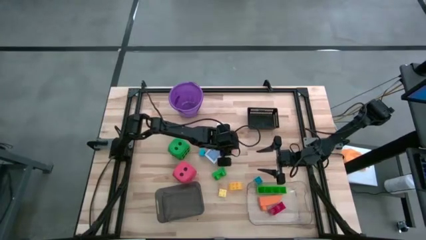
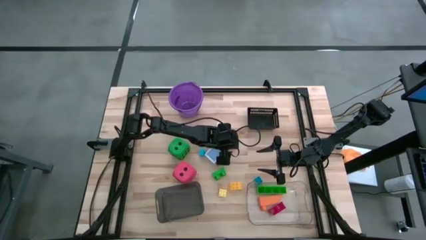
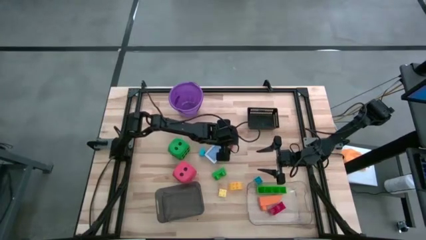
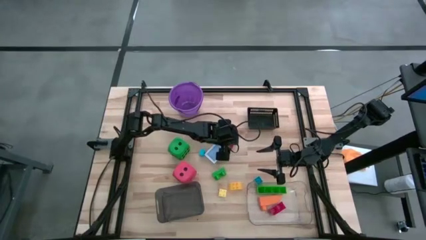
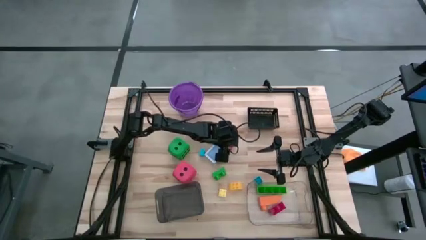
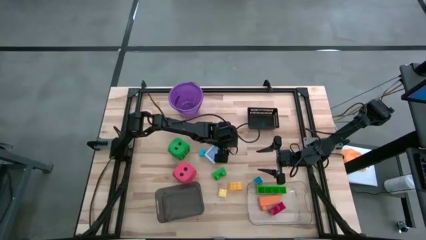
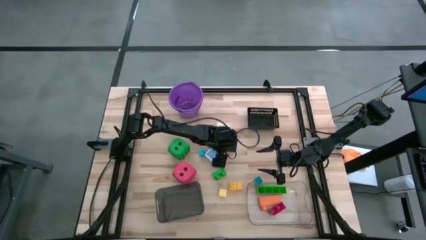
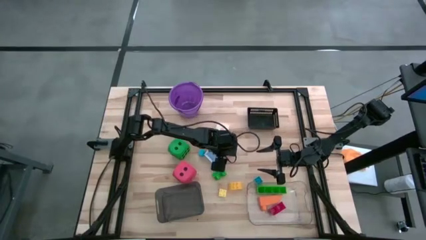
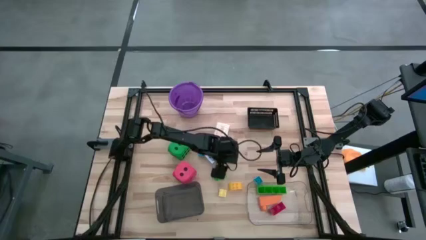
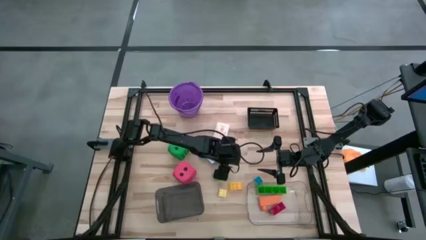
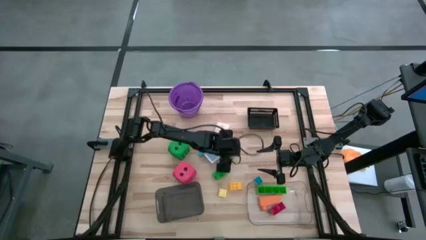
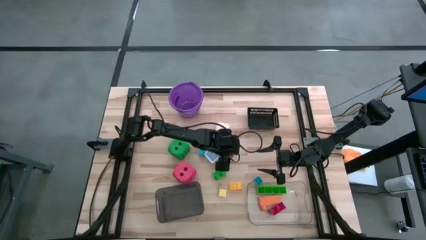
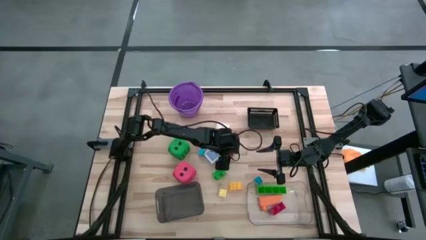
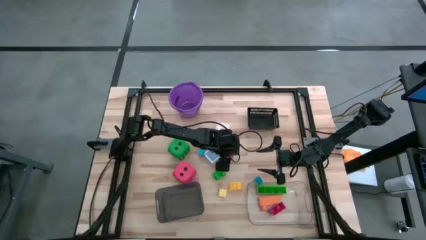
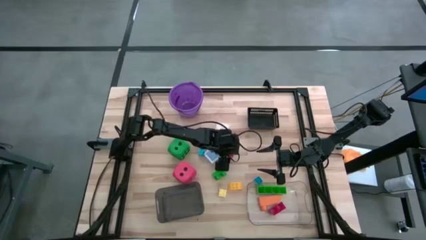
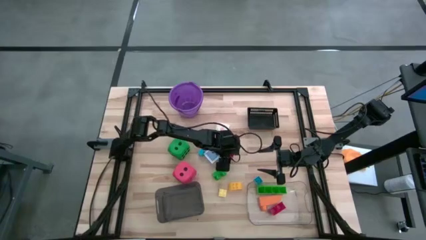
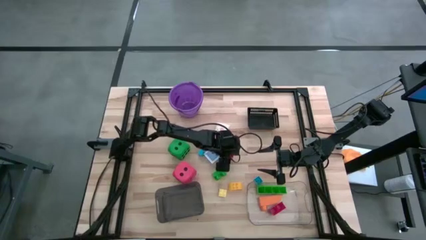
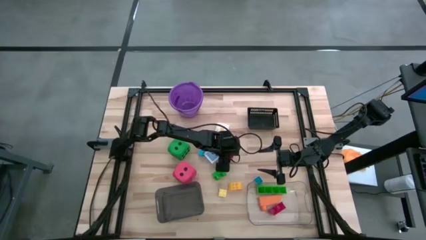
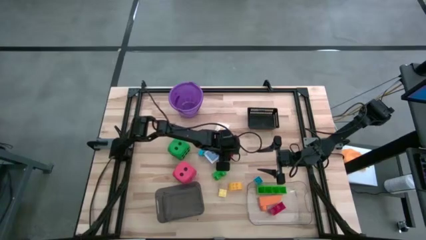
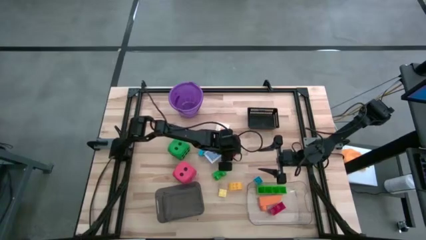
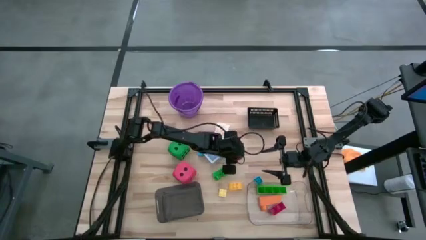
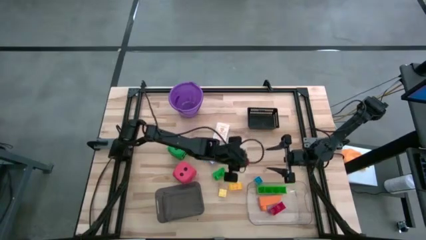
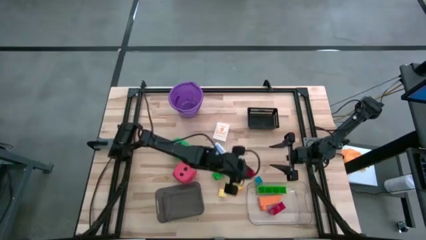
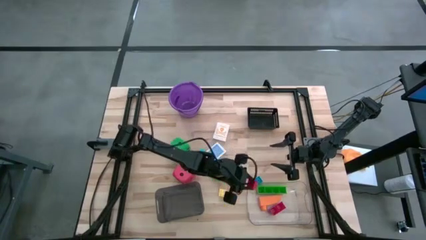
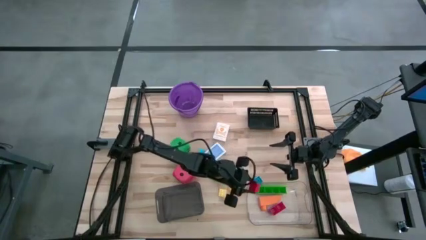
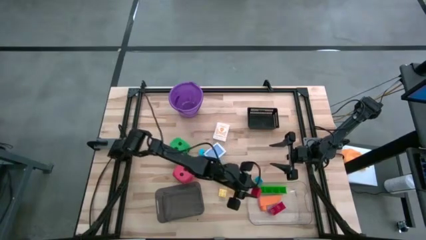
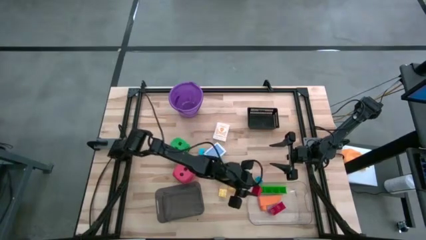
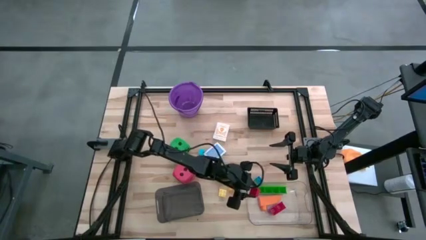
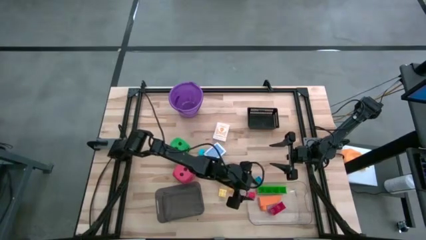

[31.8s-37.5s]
Task: Pick & Place Toys
Put the small red game piece into the transparent bin

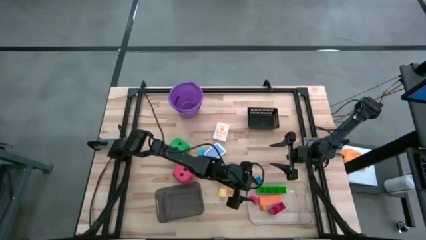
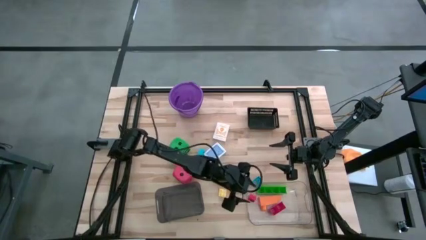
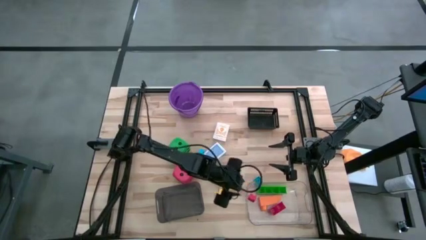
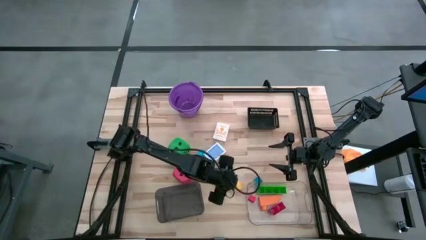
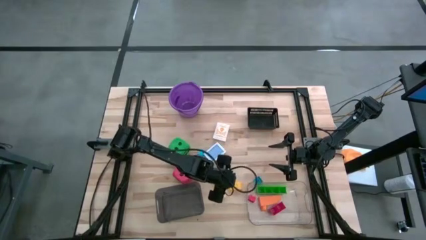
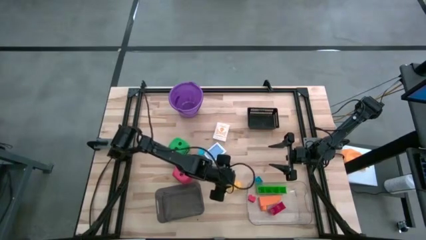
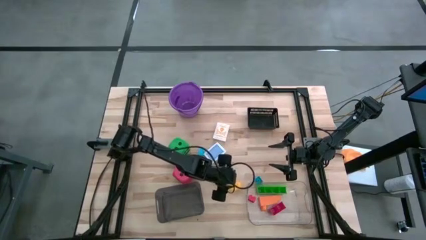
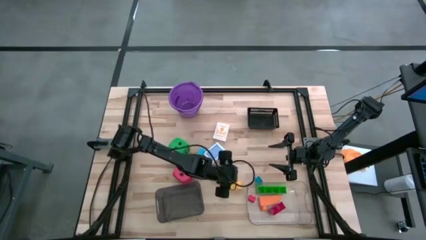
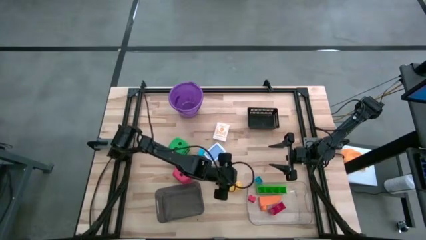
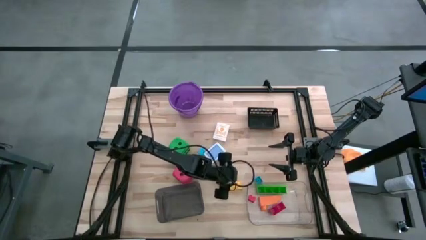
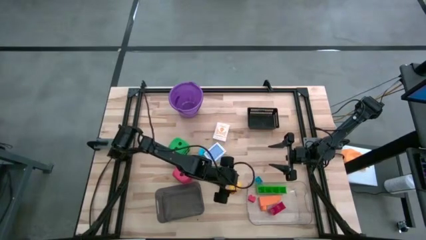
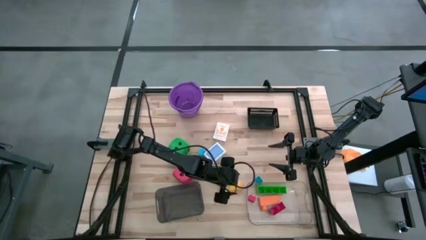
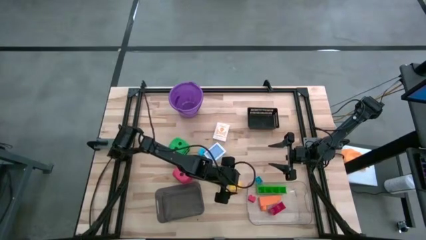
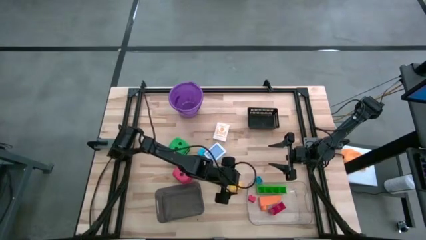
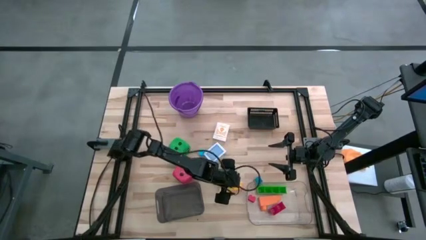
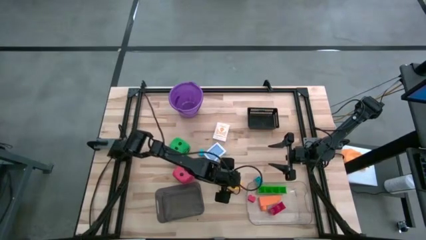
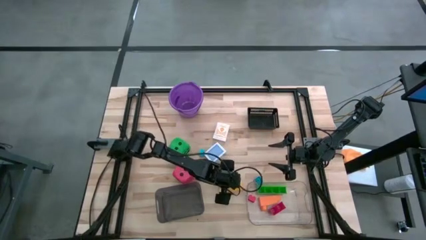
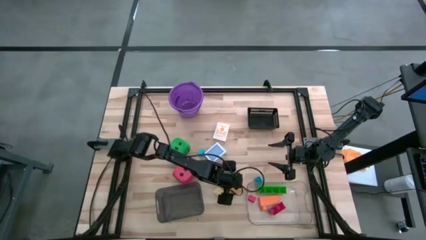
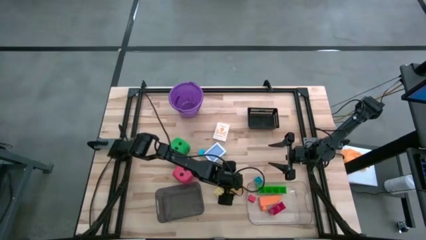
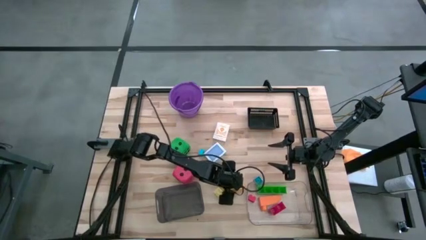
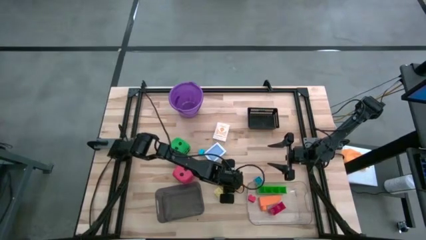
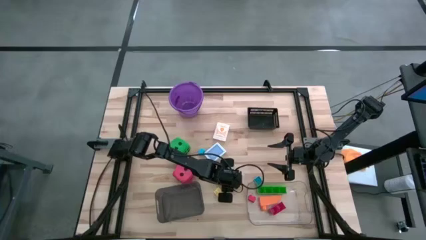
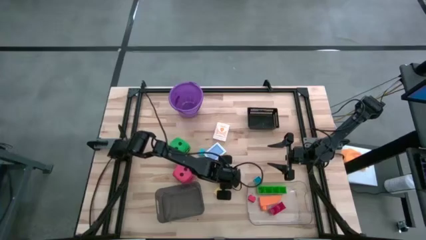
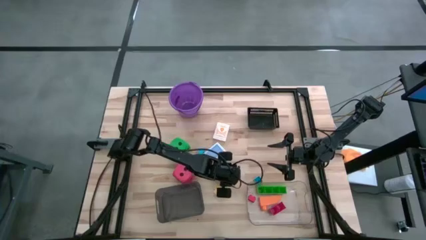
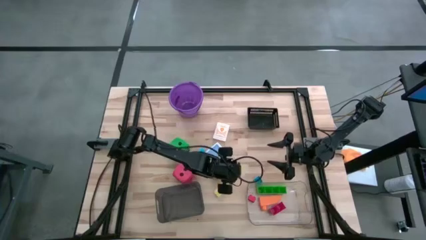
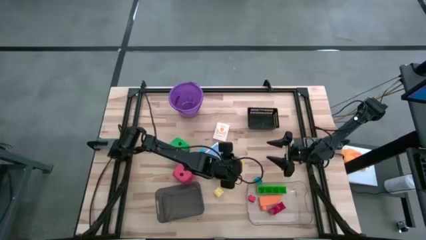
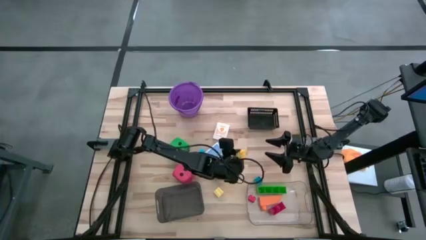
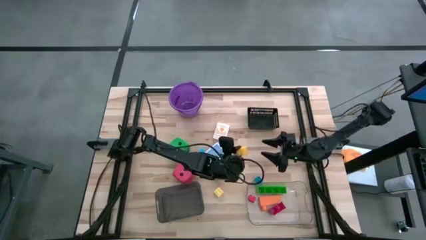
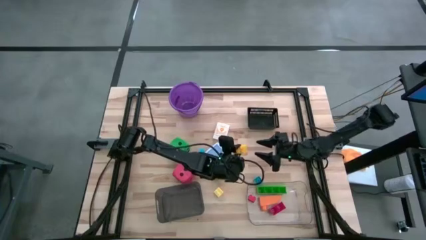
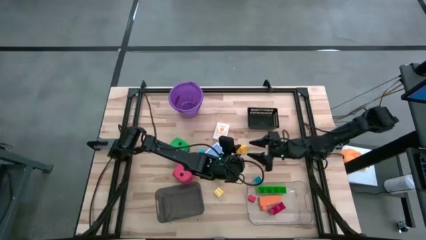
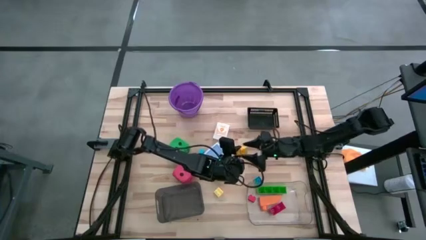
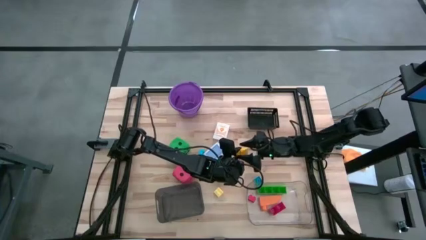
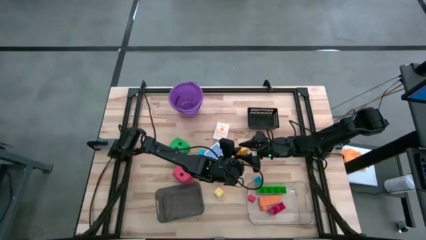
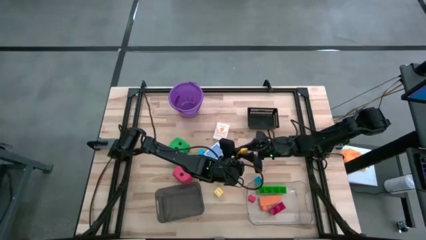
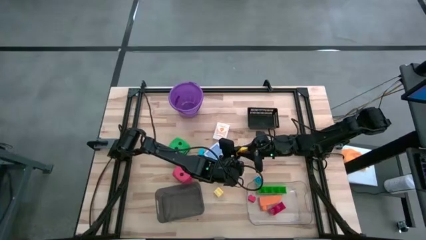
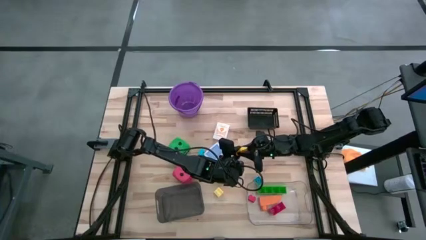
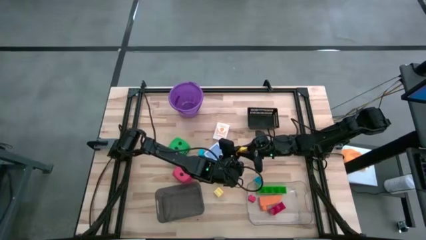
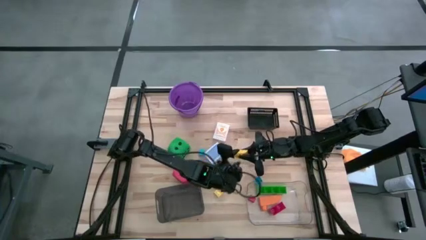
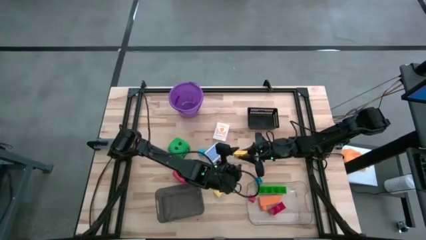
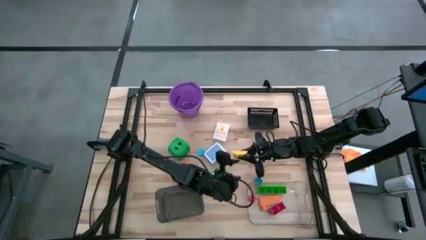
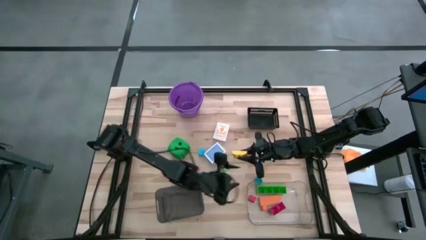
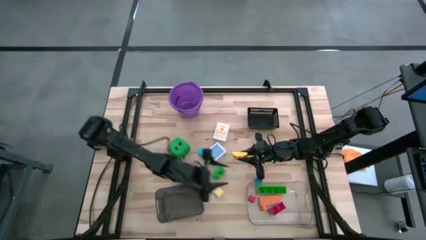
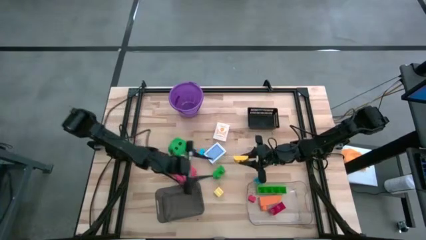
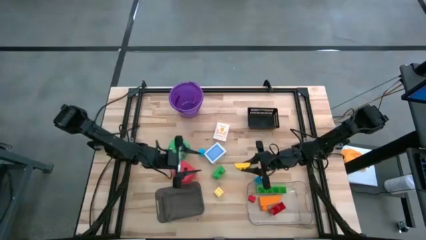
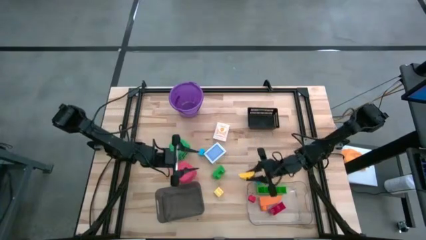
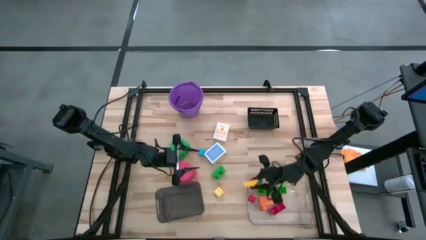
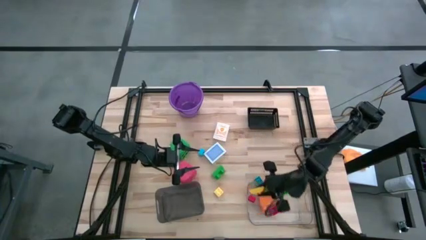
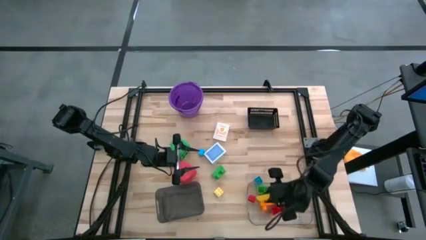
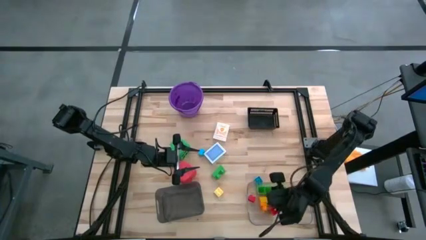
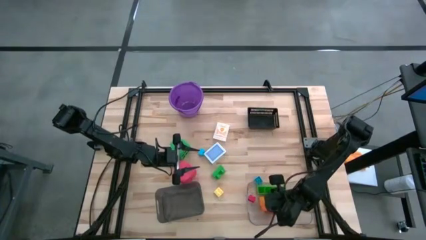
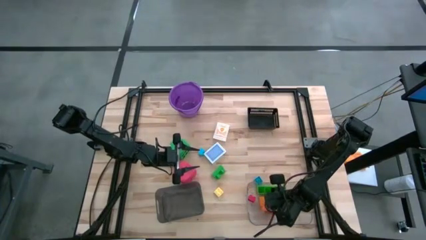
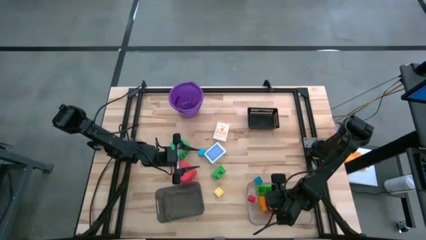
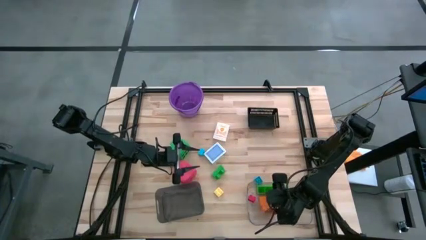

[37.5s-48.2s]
Put the small yellow game piece into the transparent bin

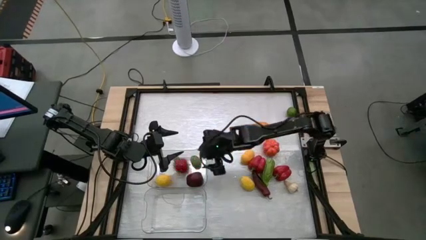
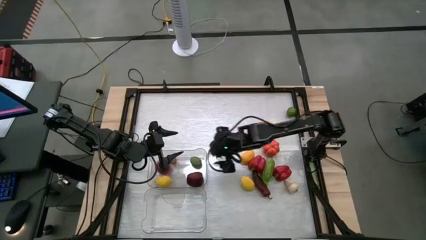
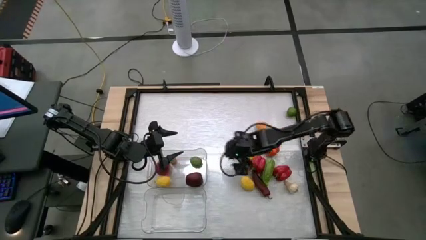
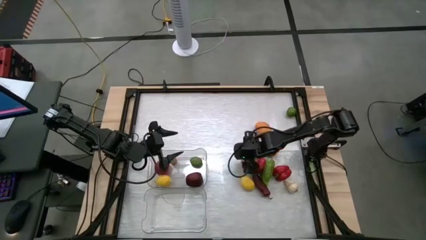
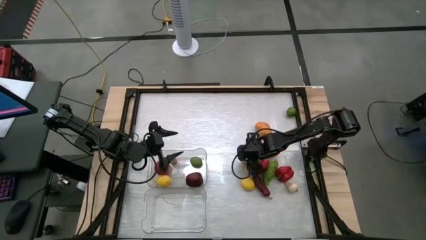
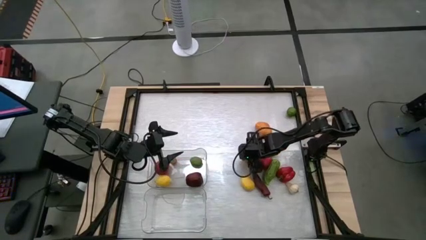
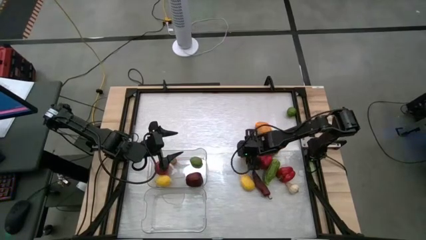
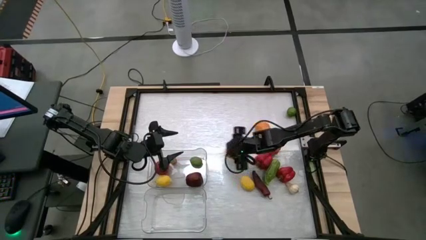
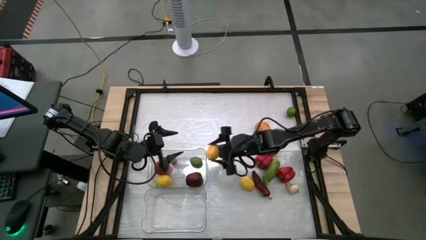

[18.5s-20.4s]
Task: Sort produce into baskets
Put the top yellow lemon into the top transparent bin
